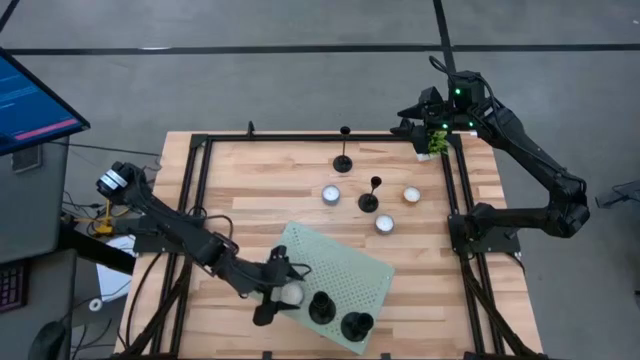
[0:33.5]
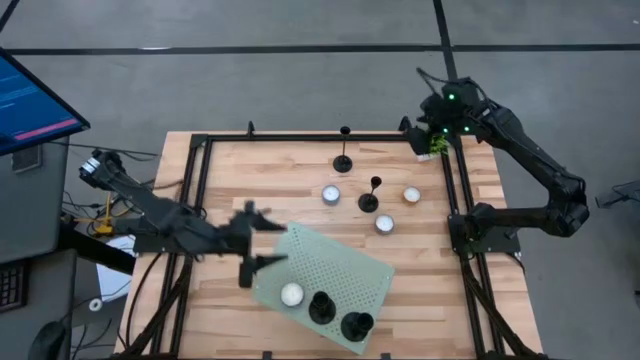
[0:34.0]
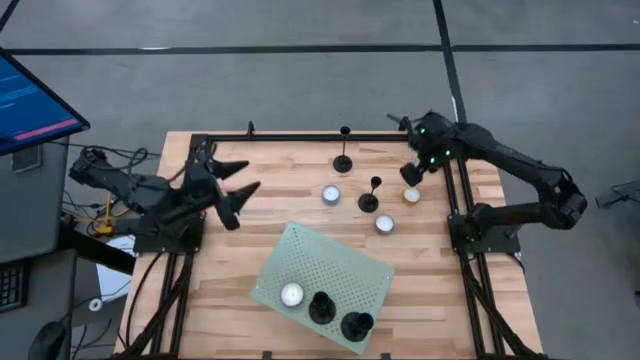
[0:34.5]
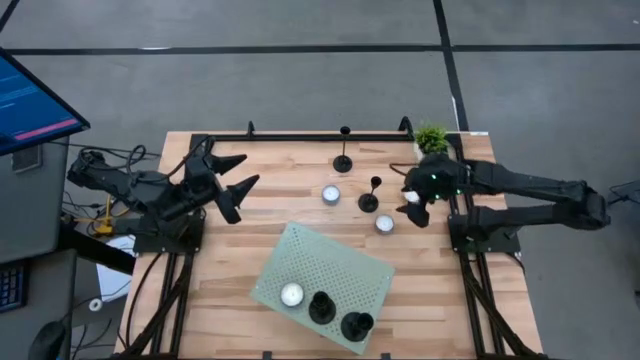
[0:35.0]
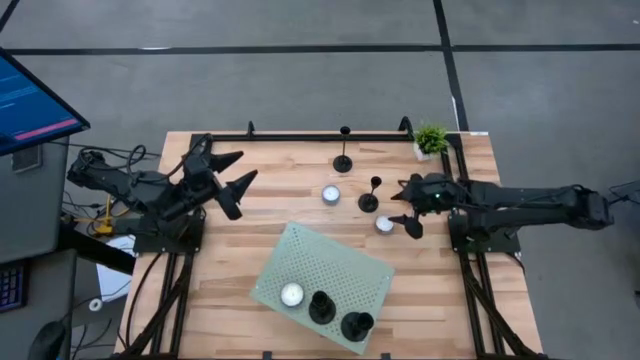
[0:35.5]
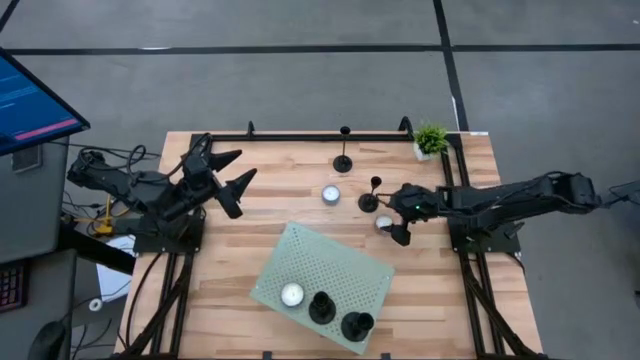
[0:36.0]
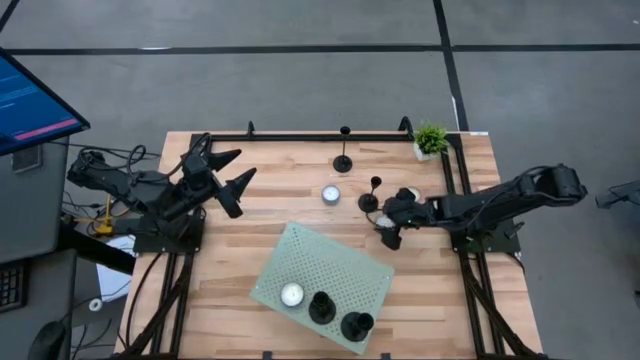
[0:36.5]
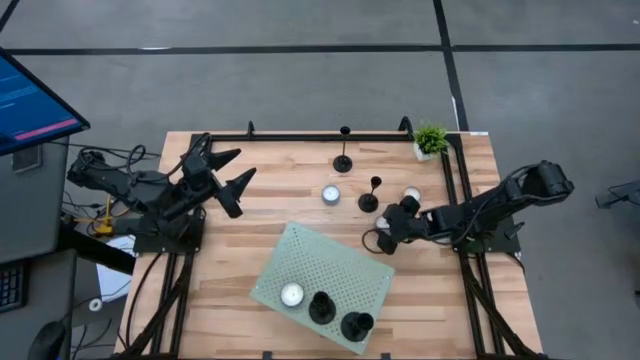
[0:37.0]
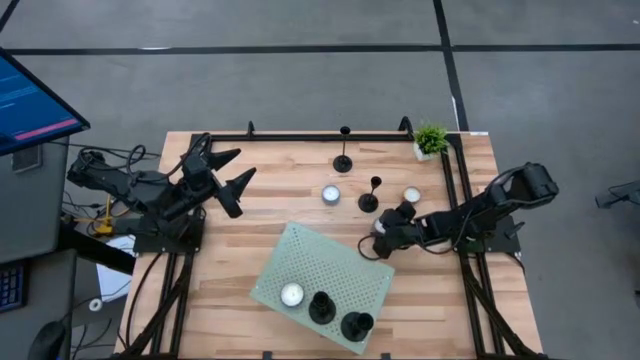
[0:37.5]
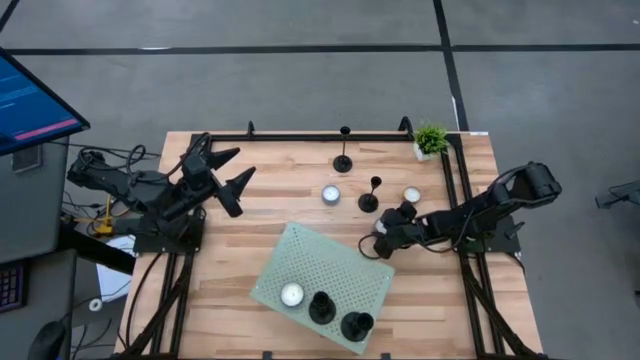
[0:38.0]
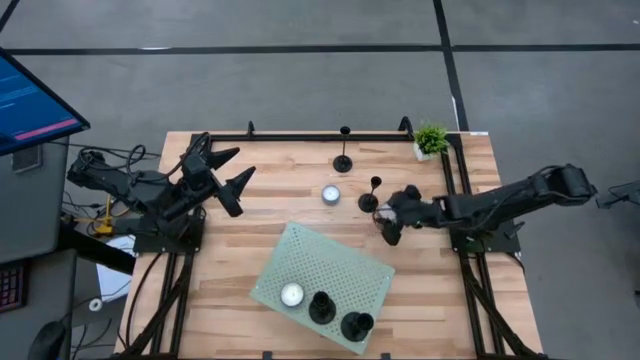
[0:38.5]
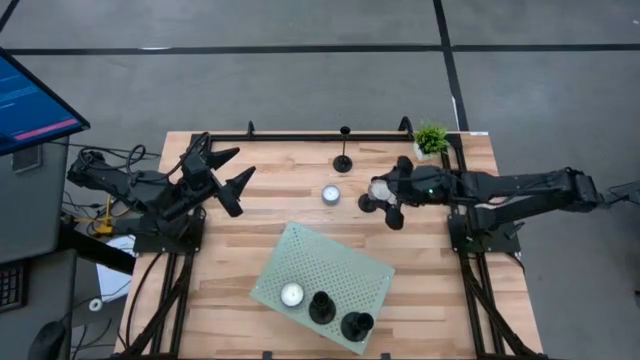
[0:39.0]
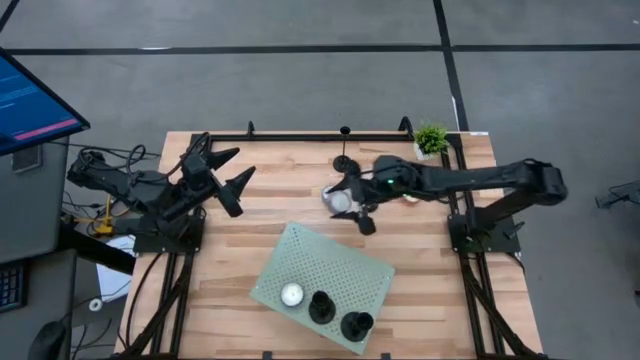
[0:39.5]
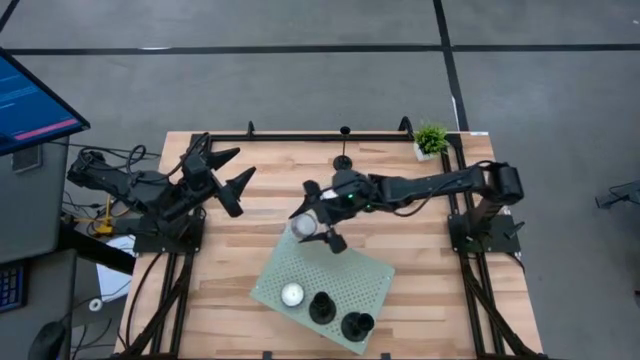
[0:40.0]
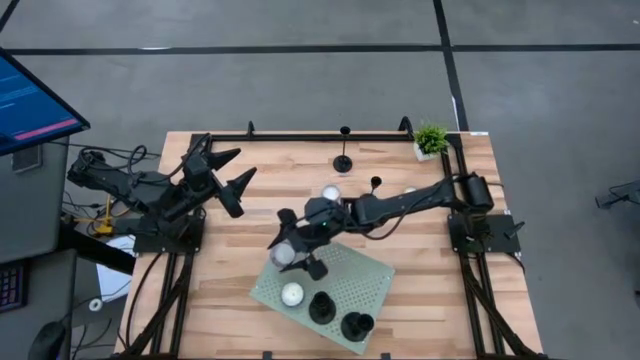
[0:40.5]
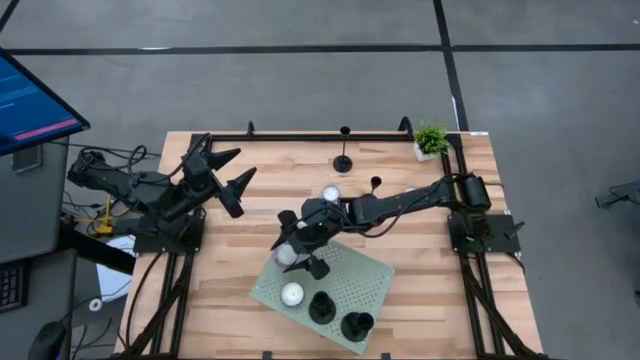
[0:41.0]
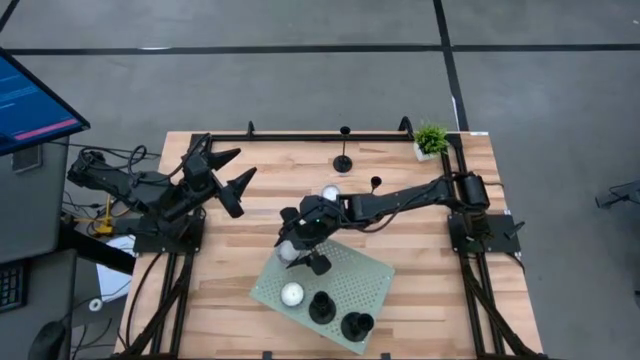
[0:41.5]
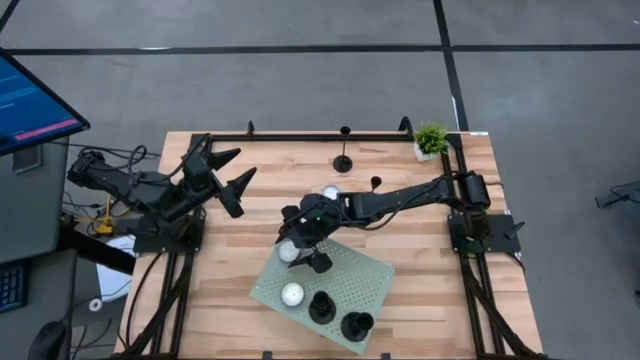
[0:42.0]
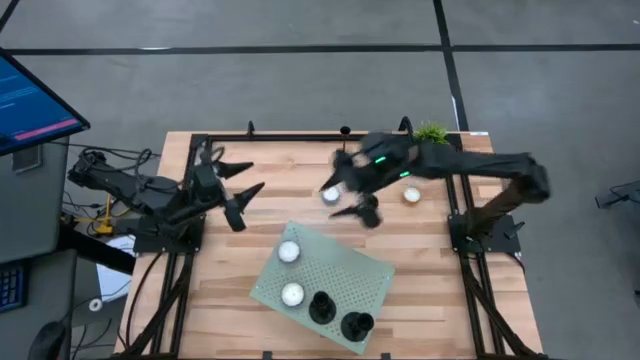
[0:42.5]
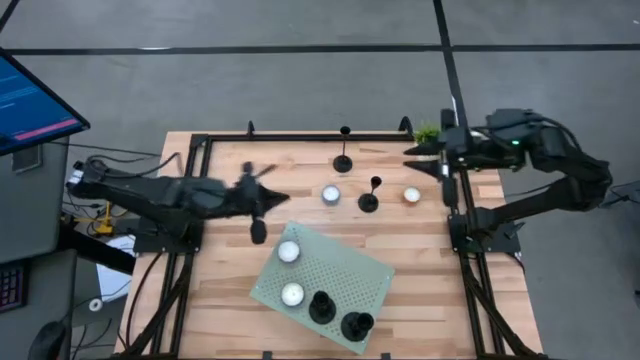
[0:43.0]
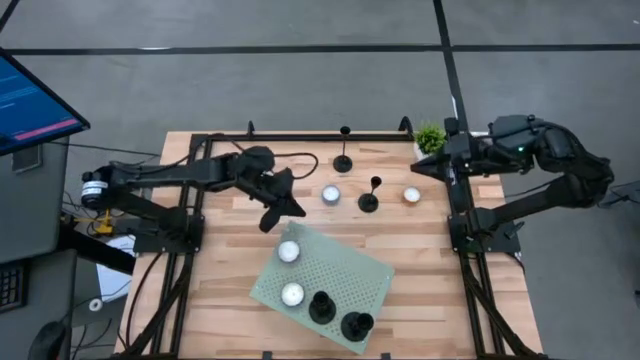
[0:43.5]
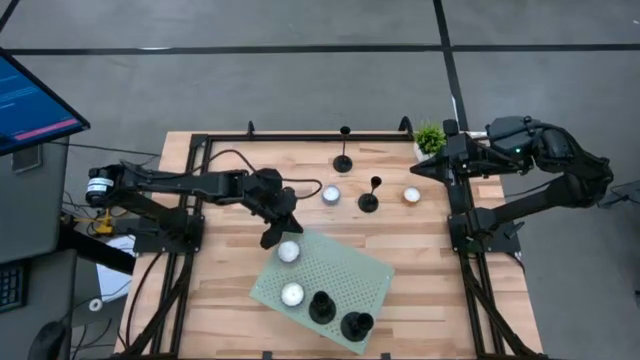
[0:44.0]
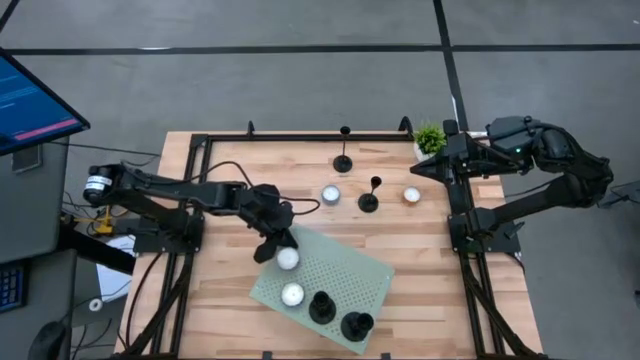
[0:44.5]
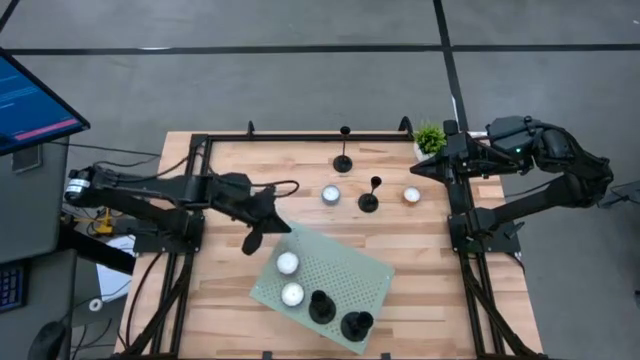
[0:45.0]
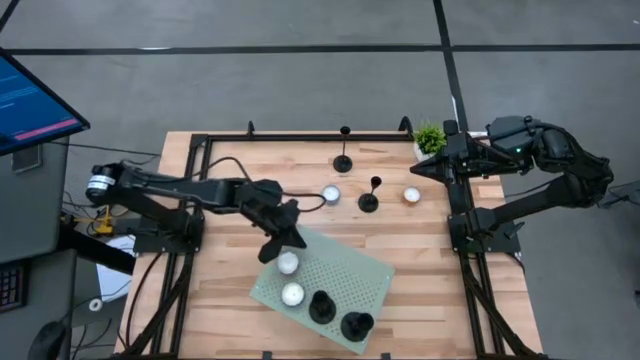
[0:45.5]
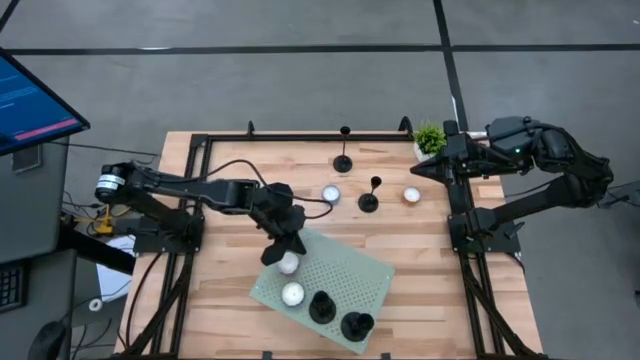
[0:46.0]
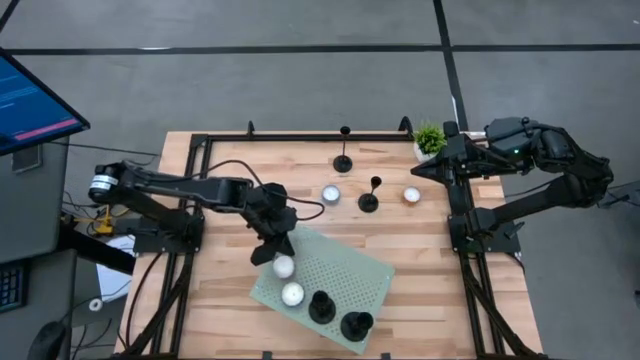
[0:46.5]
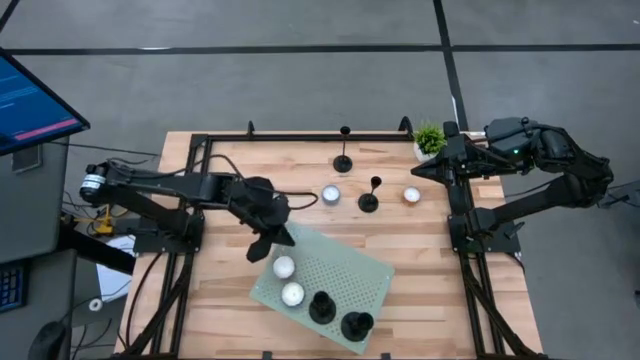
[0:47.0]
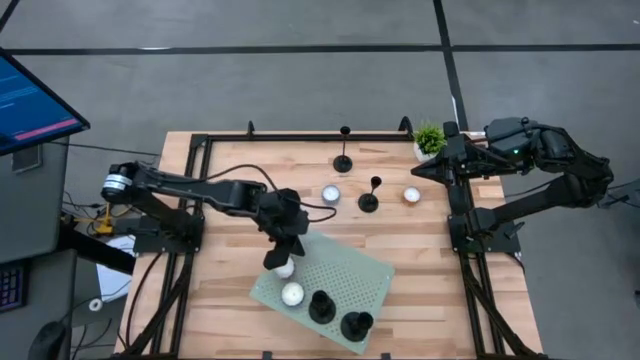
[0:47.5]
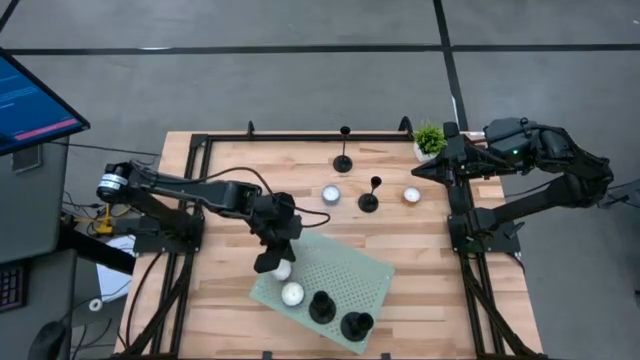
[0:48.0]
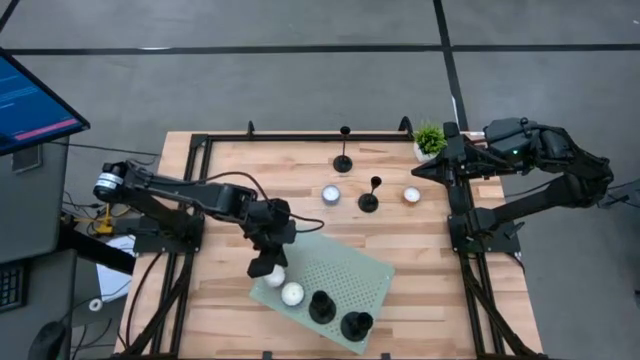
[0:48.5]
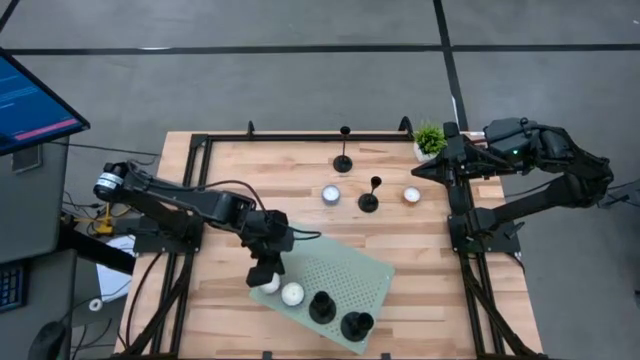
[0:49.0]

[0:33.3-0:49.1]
Task: Pick & Place candle stick holders
Put the red patterned scented candle on the shelf

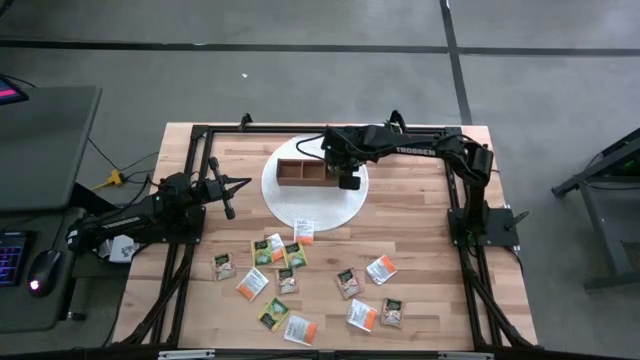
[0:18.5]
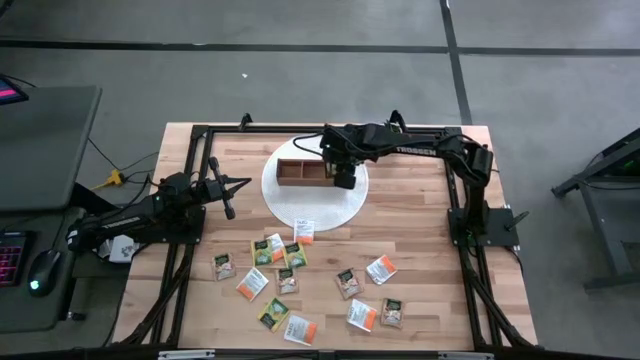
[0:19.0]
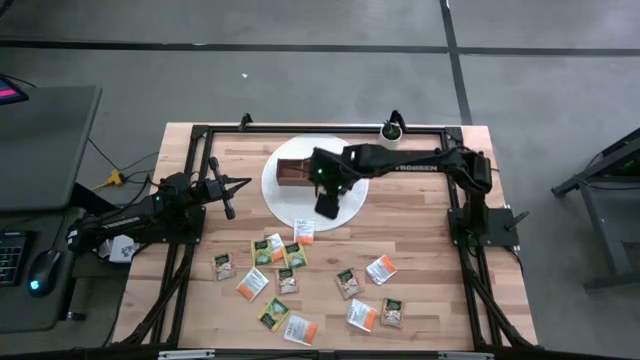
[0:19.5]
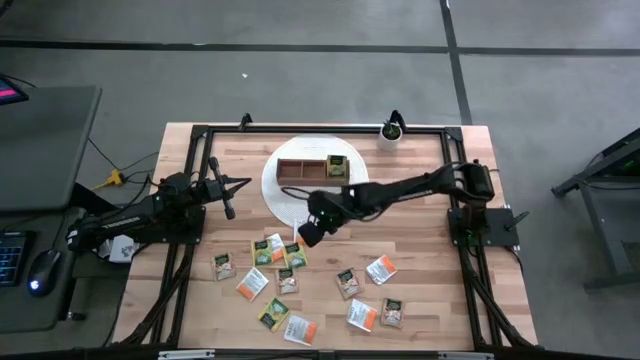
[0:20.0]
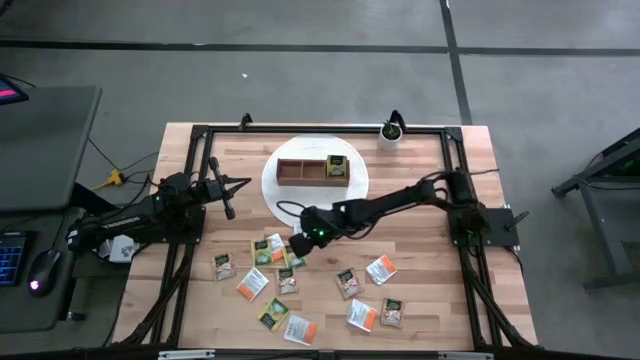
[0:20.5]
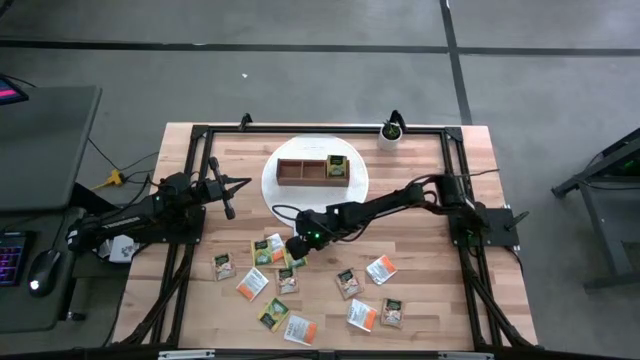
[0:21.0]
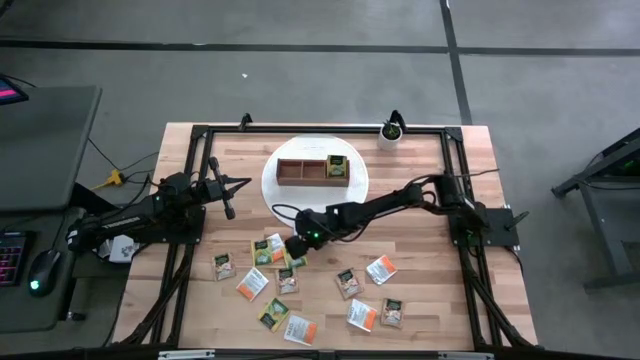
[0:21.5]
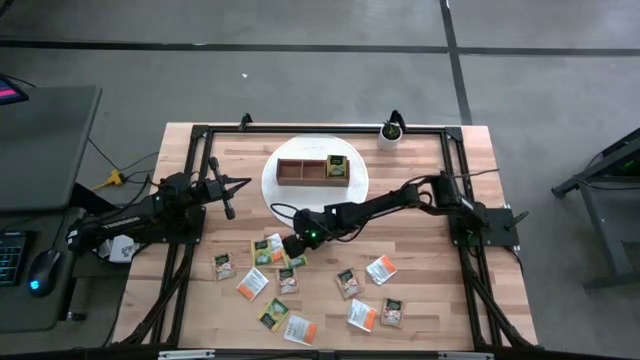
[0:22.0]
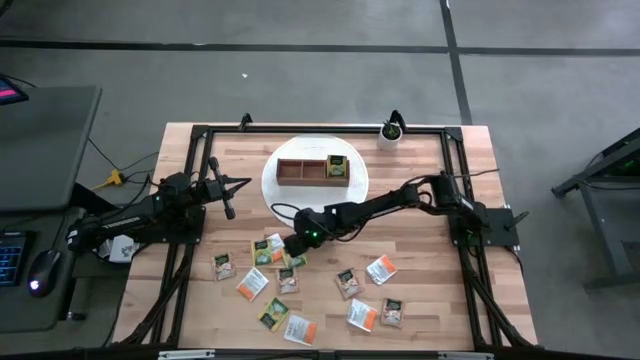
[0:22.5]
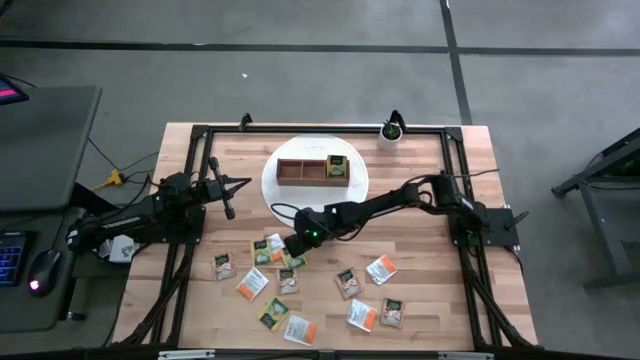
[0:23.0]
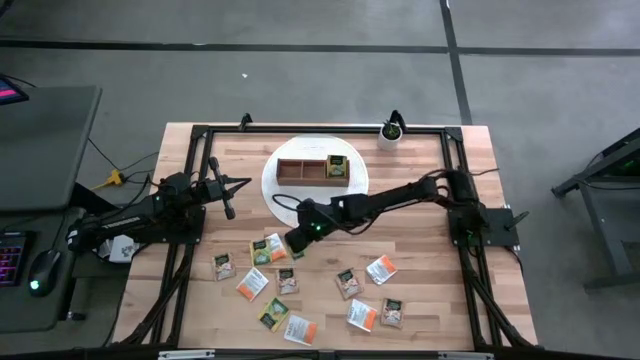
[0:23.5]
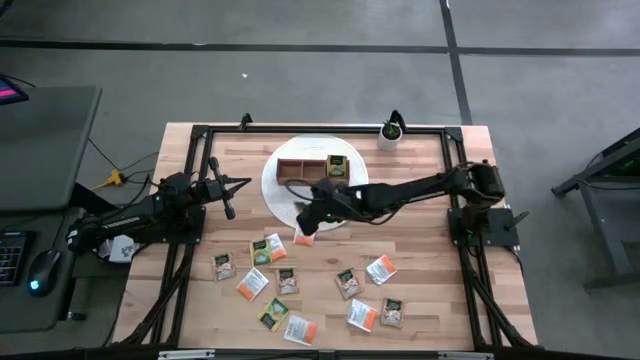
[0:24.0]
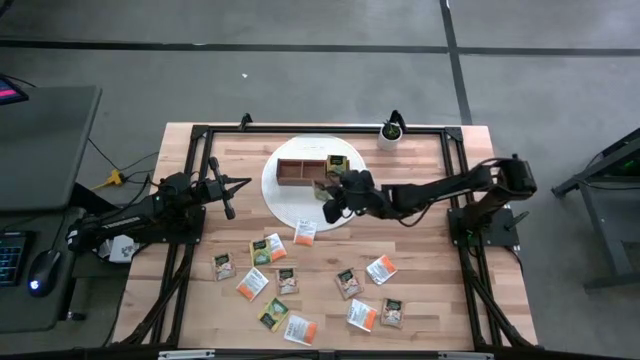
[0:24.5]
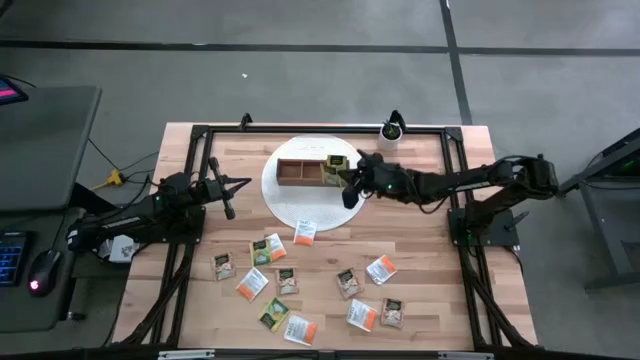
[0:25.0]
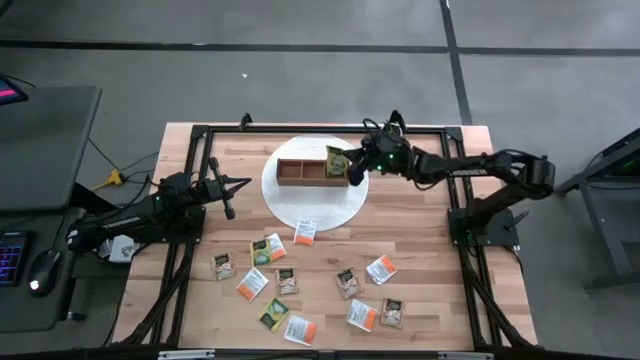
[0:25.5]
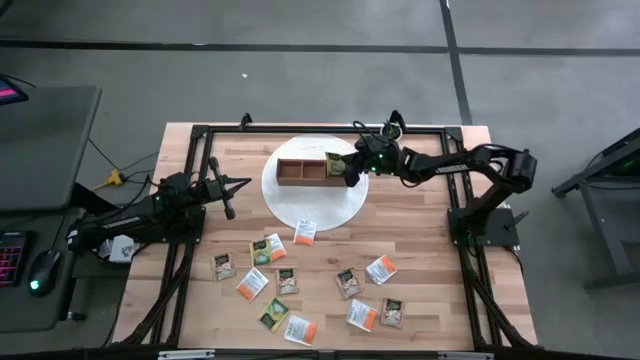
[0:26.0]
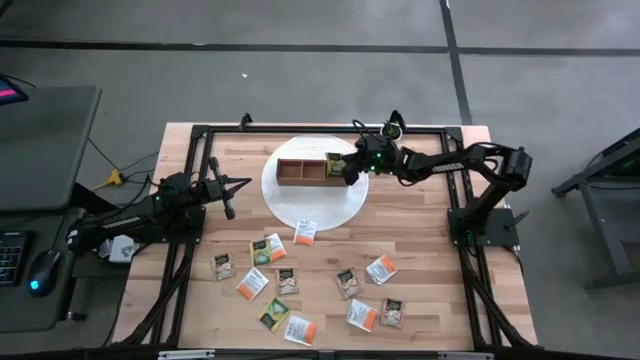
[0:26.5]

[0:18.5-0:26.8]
Task: Pick & Place Tea
Put the green tea bag into the right section of the wooden organizer
